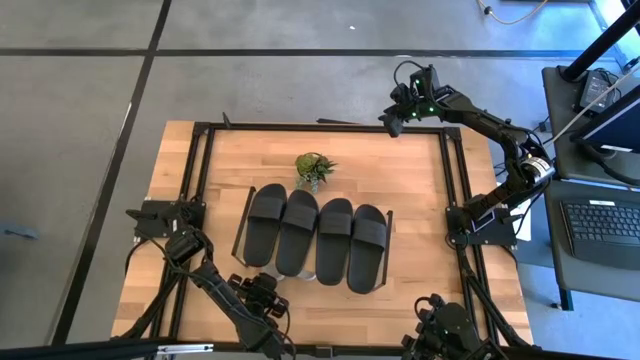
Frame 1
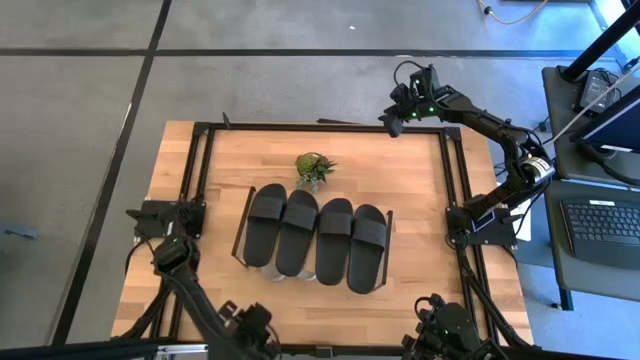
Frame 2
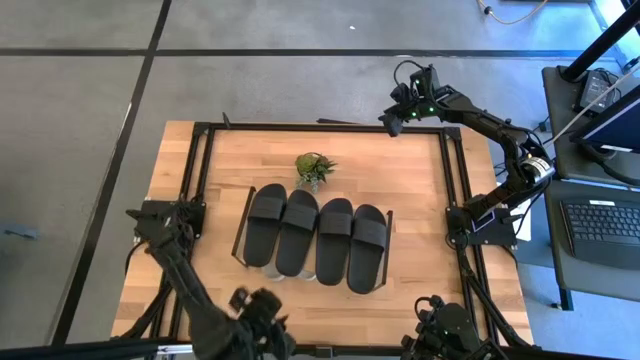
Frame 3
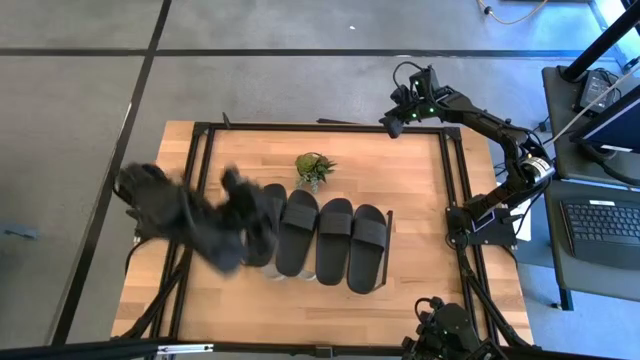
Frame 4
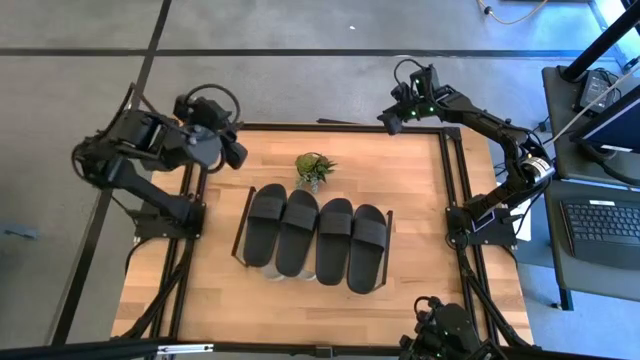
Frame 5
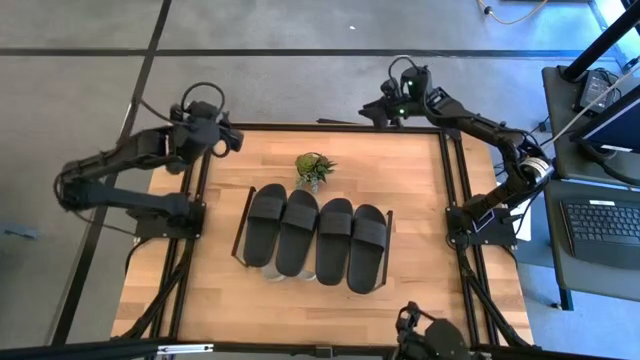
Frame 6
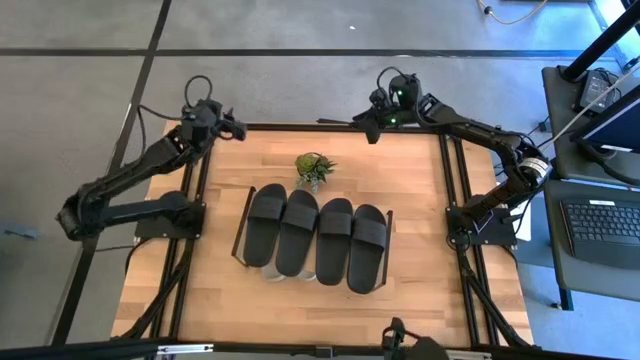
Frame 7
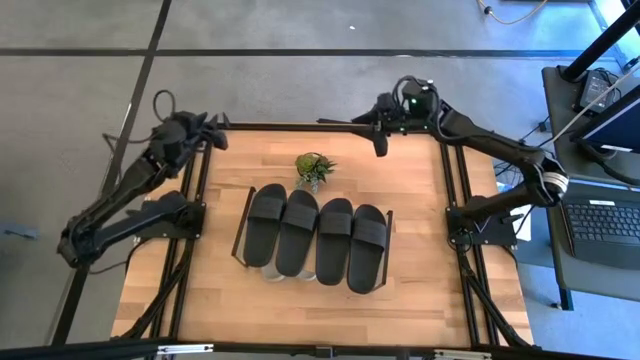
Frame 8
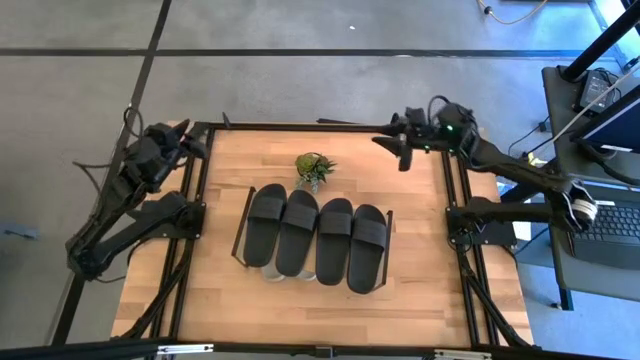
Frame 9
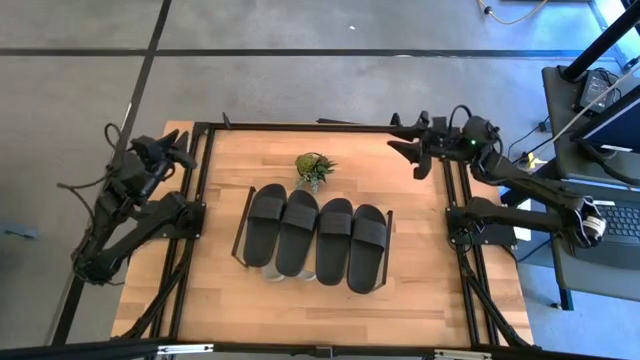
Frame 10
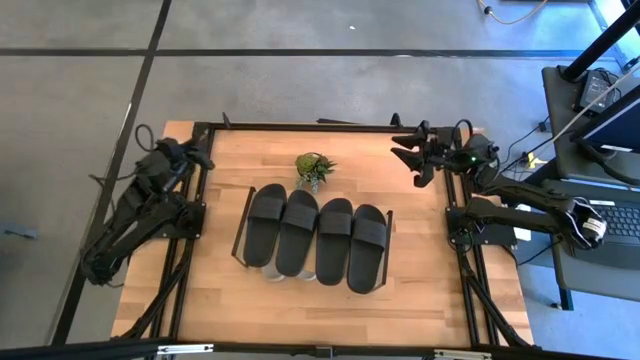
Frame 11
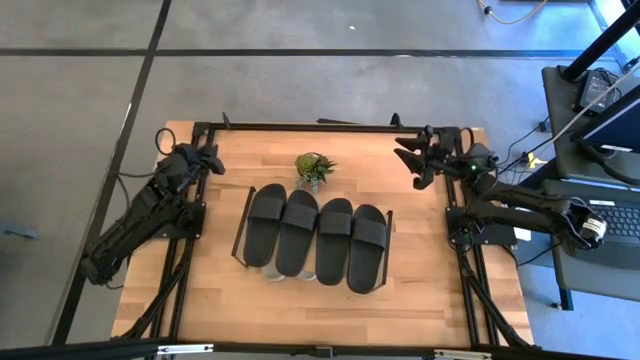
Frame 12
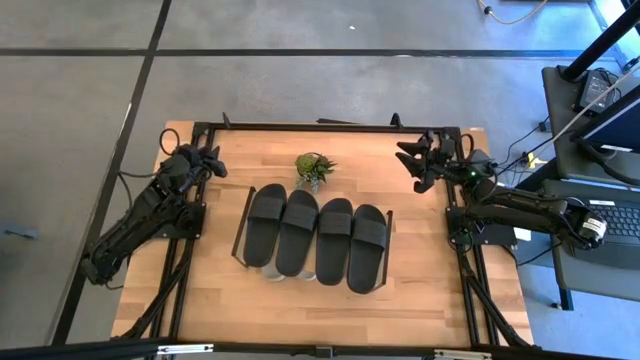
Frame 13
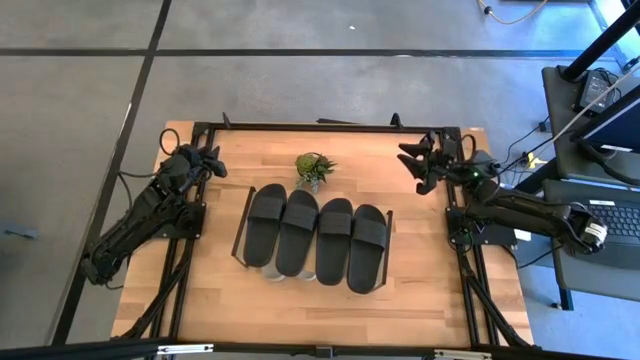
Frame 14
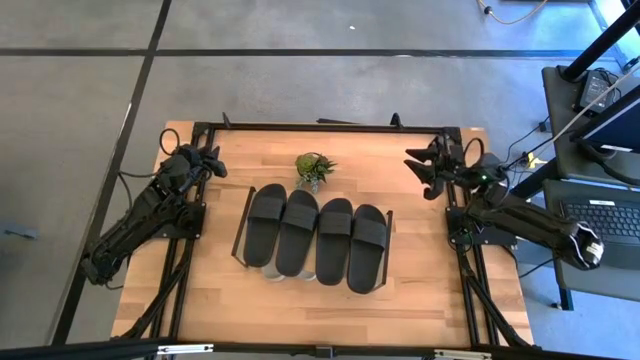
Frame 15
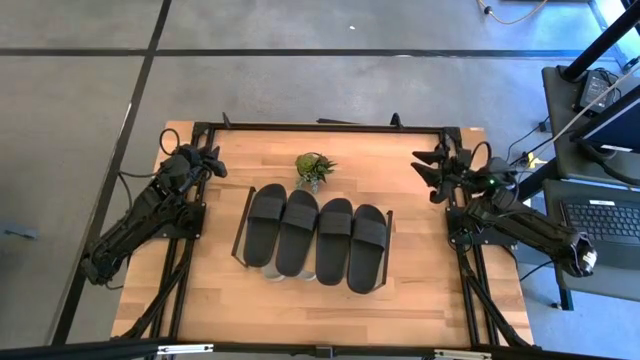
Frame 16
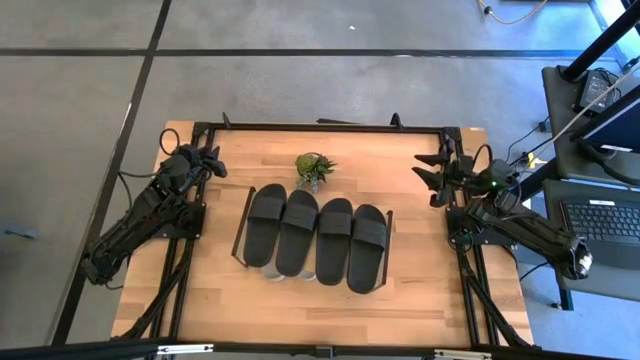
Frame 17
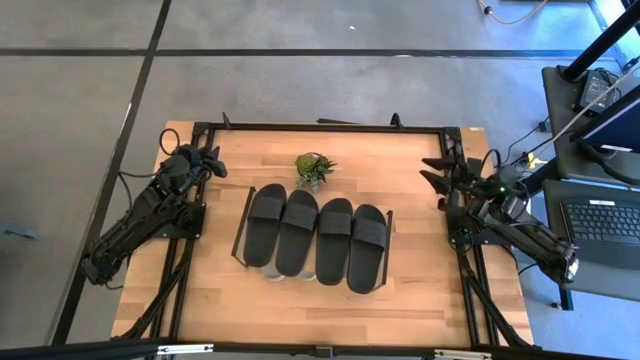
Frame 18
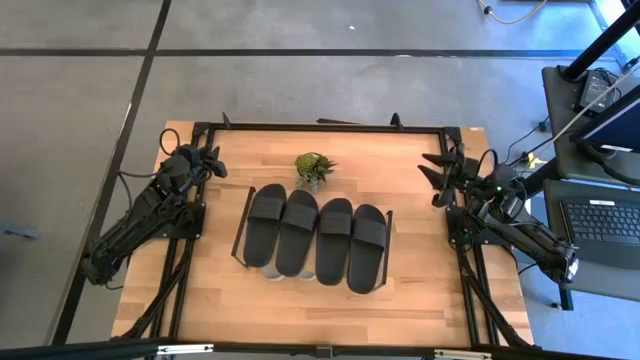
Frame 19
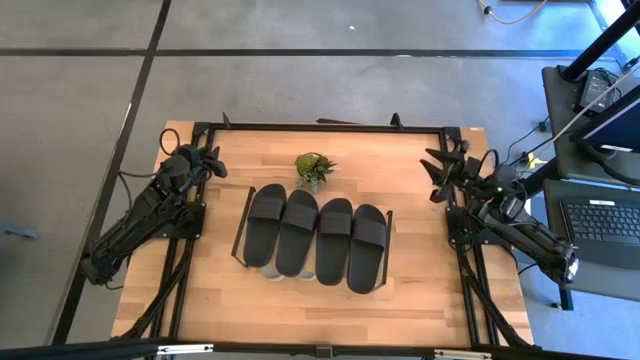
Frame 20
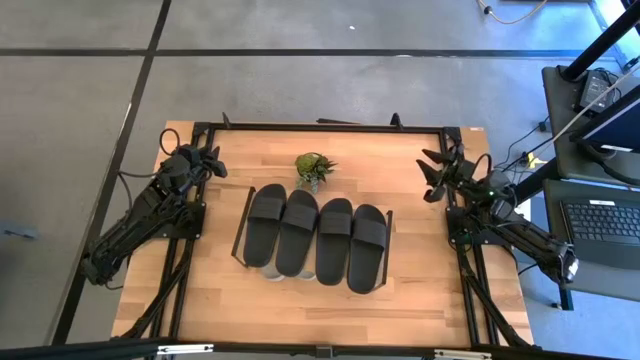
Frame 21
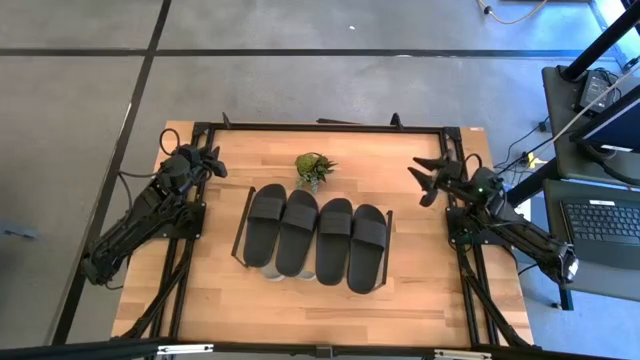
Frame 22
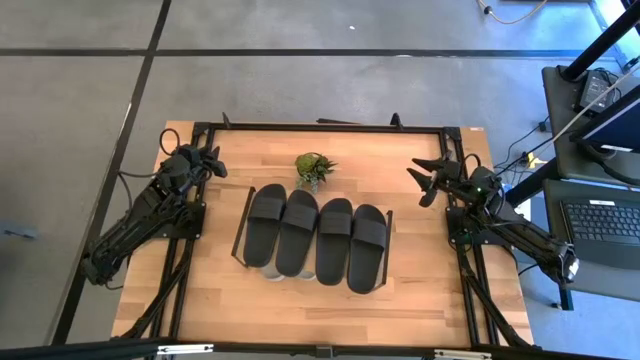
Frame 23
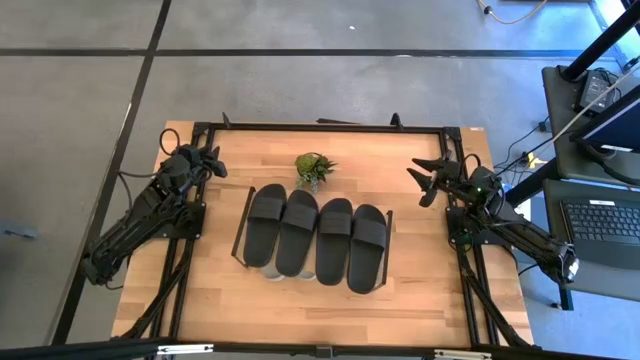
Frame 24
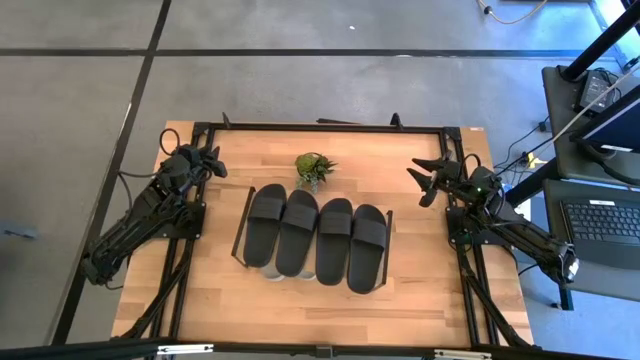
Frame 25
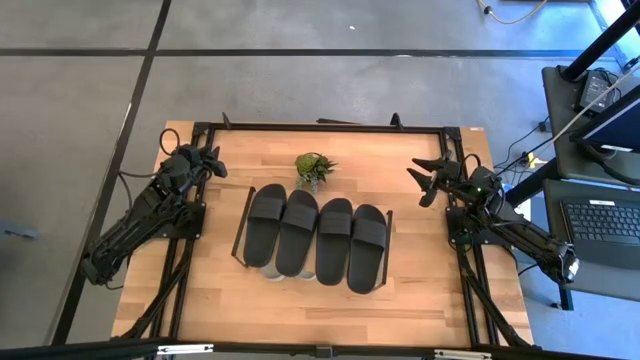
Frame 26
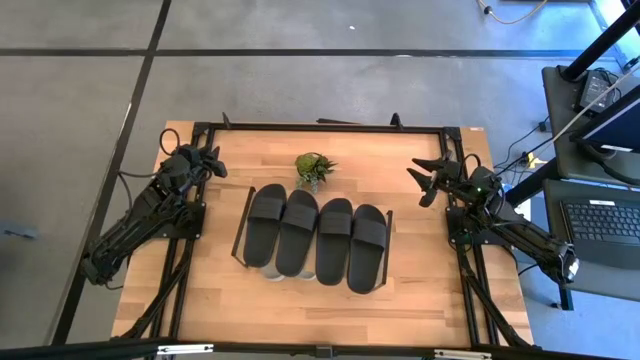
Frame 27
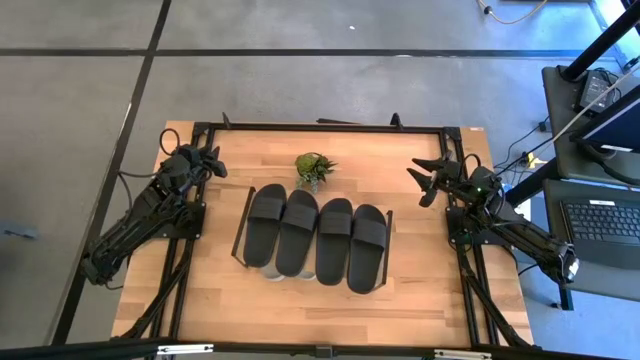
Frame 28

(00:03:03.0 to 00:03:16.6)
Task: Pick and place slides into the shelf
Return to Home Position

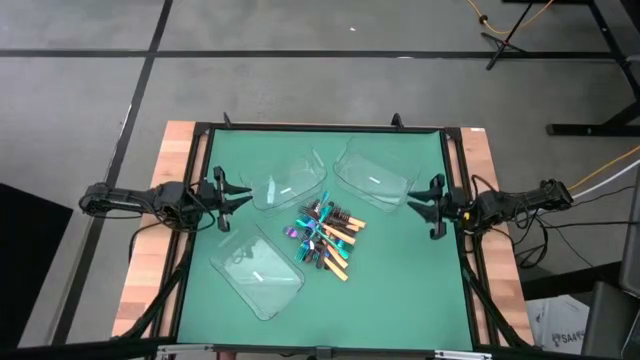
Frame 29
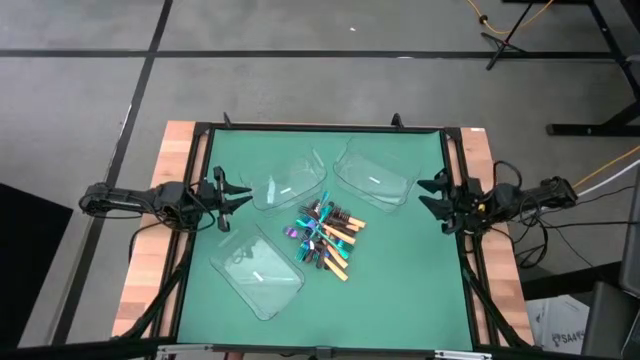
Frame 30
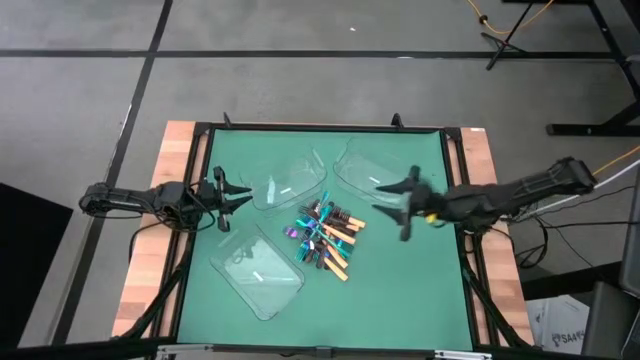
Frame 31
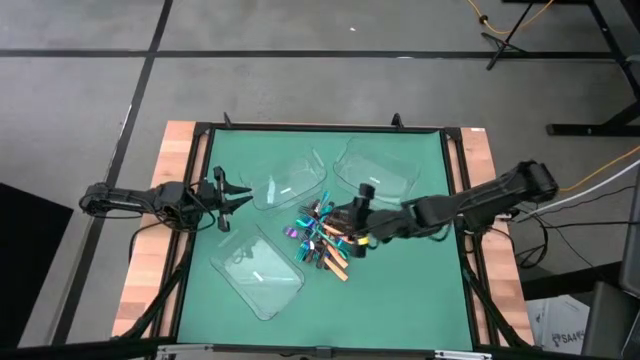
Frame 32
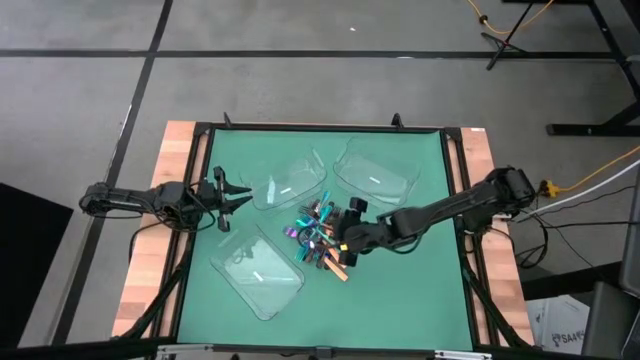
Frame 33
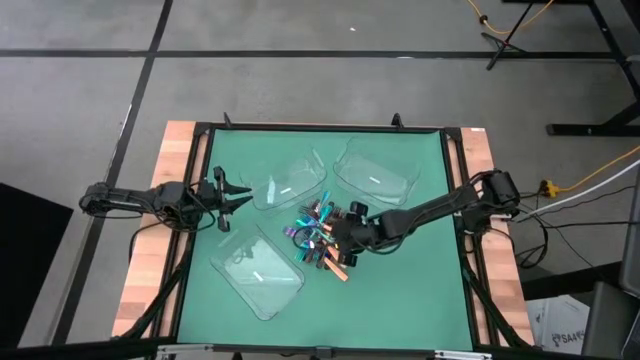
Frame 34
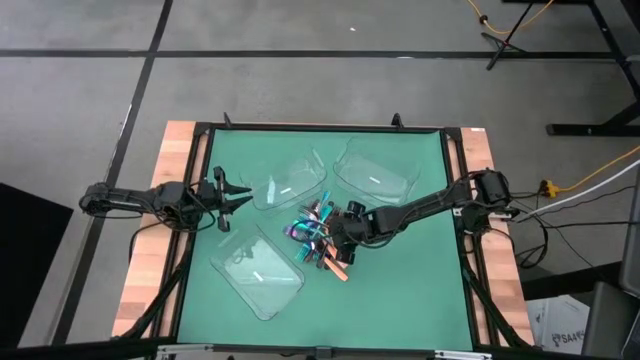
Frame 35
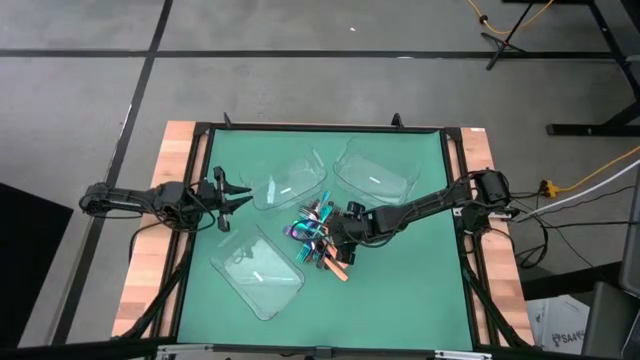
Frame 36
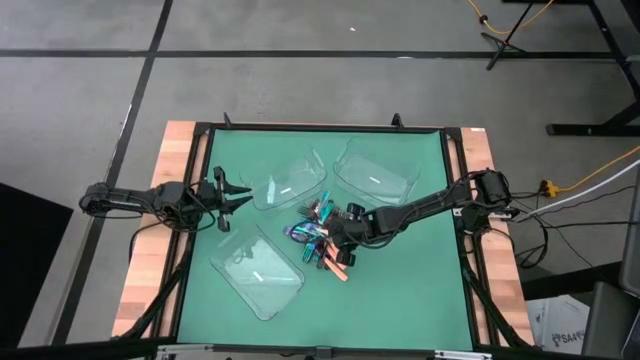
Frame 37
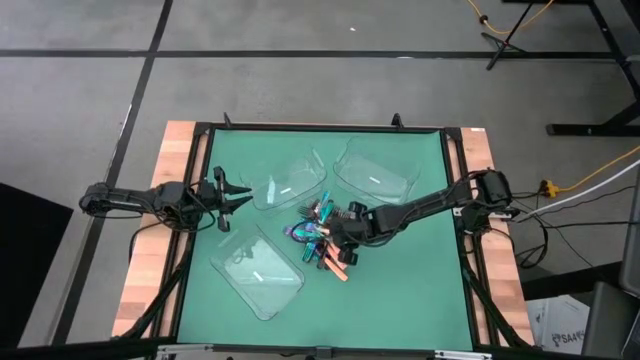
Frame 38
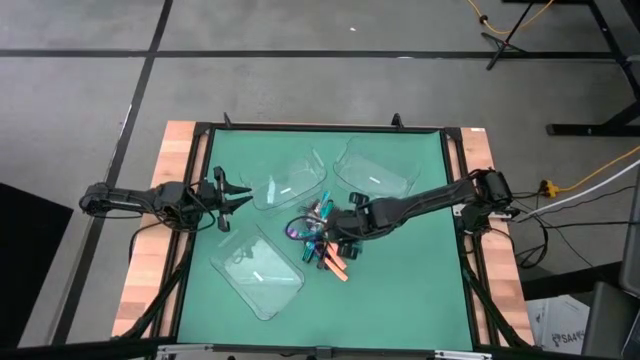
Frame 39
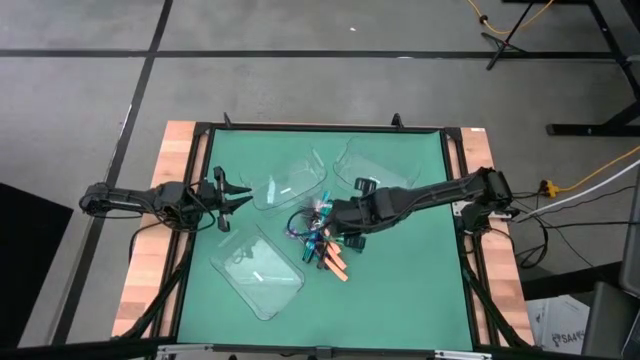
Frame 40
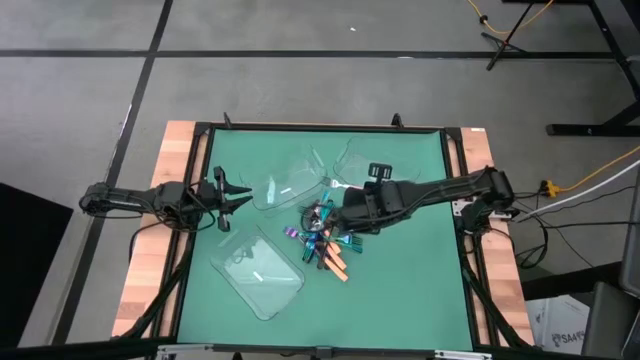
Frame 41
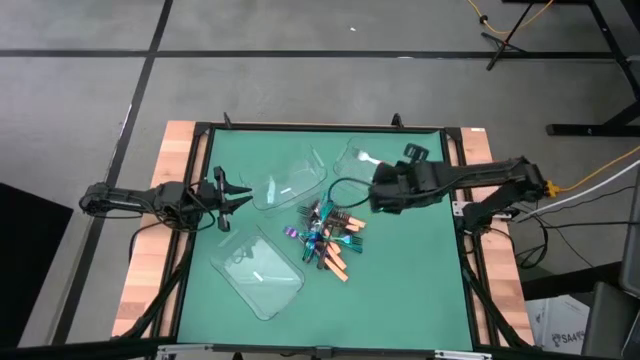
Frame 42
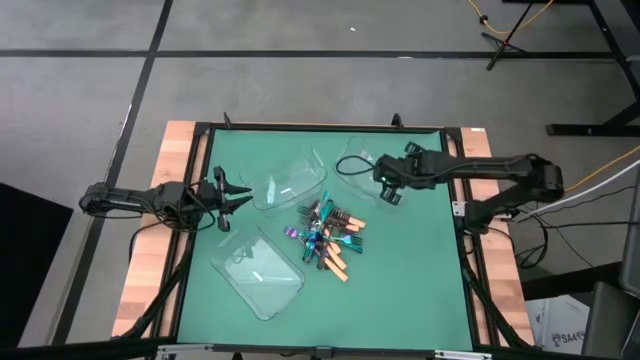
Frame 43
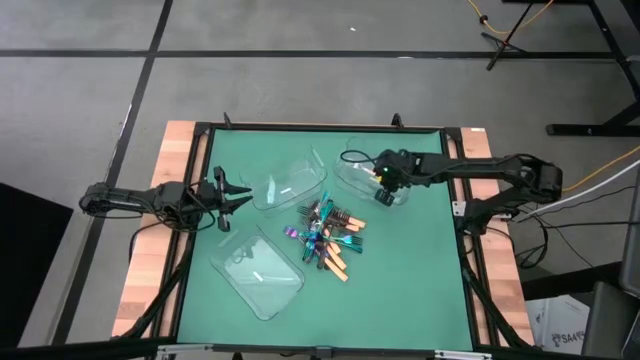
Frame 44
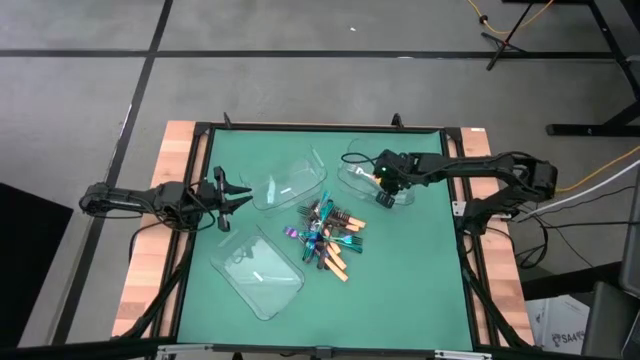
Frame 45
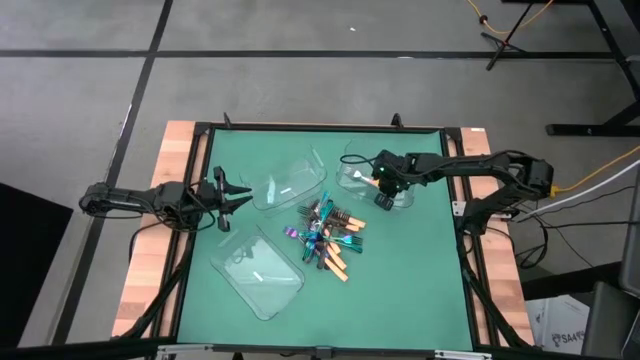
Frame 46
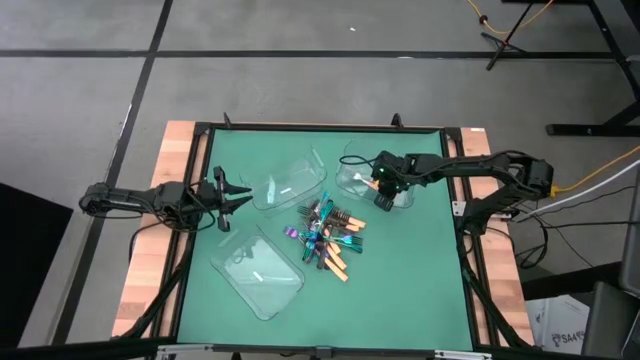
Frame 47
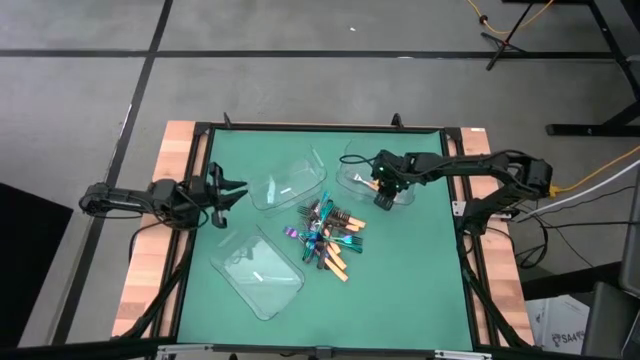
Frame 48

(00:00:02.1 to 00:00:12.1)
Task: Sort silverware by color (type)
Put the yellow fork into the top right transparent bin
